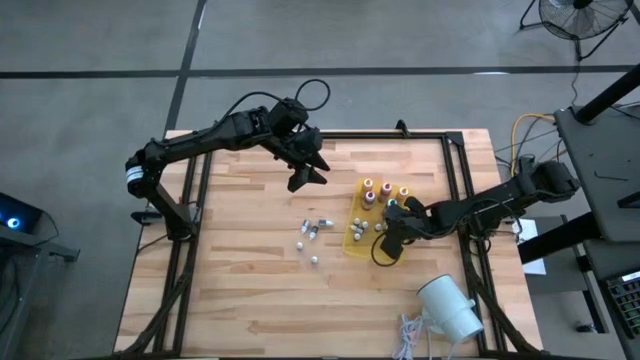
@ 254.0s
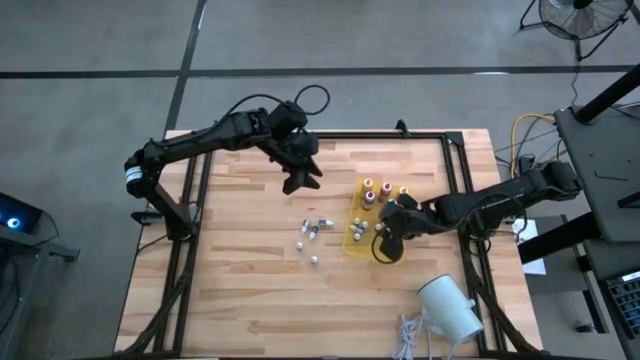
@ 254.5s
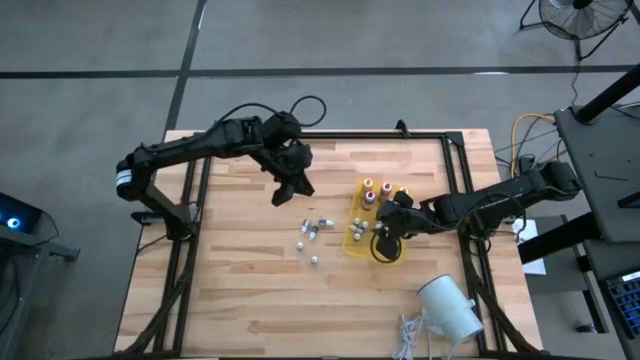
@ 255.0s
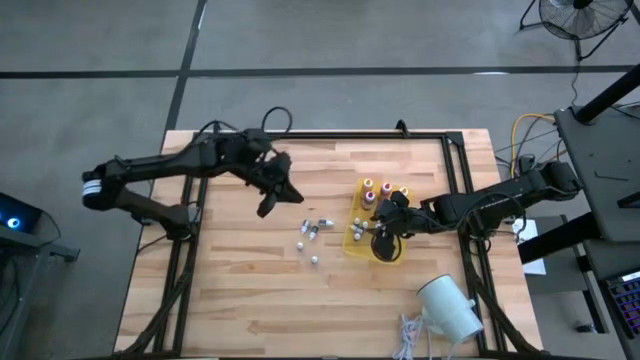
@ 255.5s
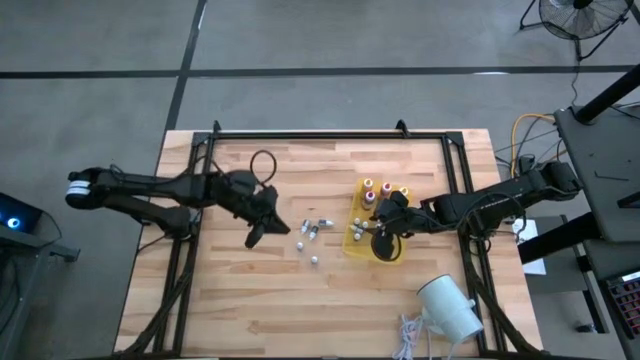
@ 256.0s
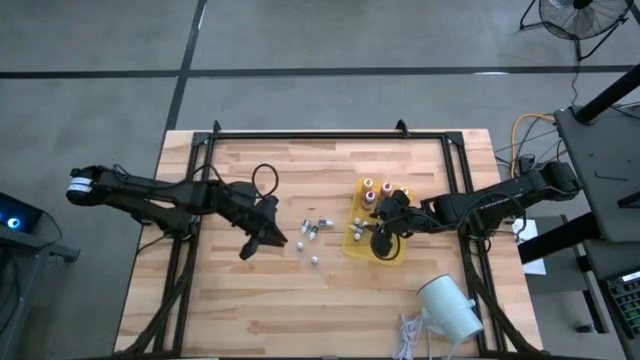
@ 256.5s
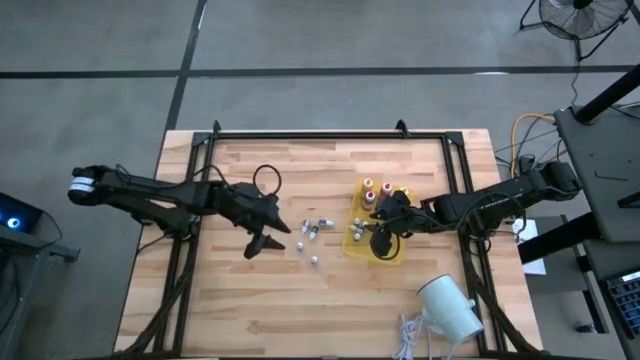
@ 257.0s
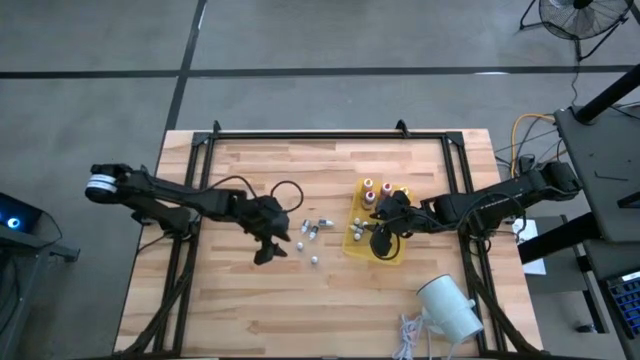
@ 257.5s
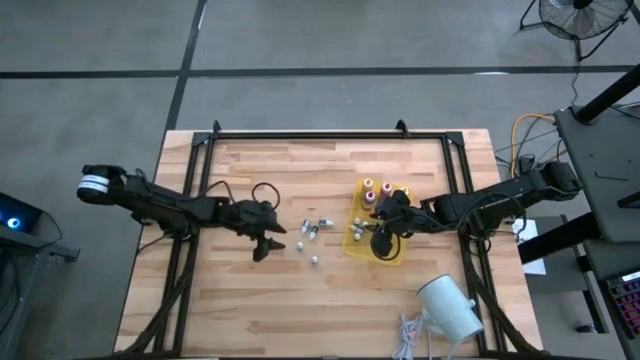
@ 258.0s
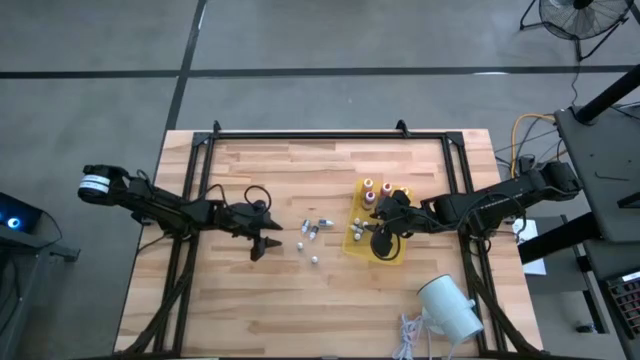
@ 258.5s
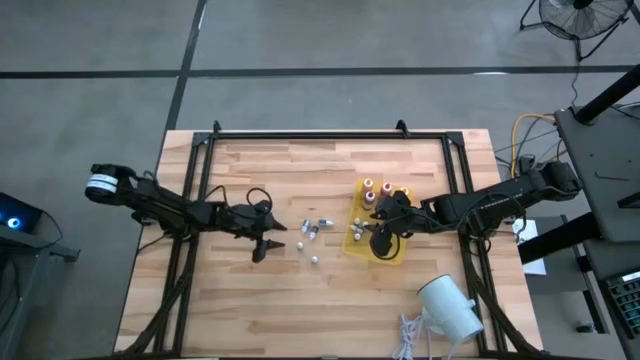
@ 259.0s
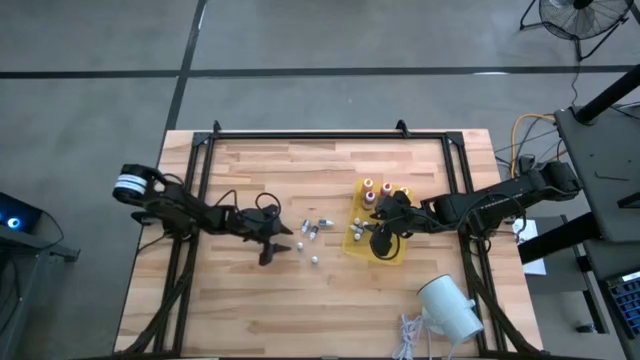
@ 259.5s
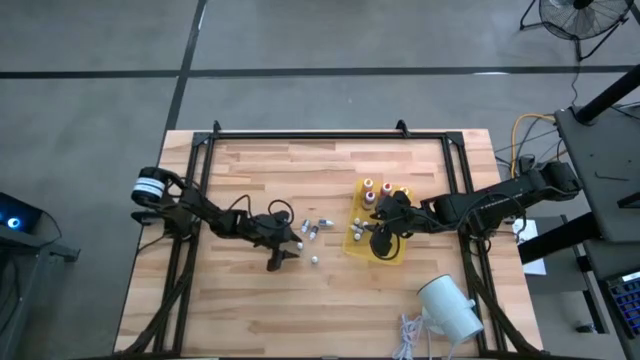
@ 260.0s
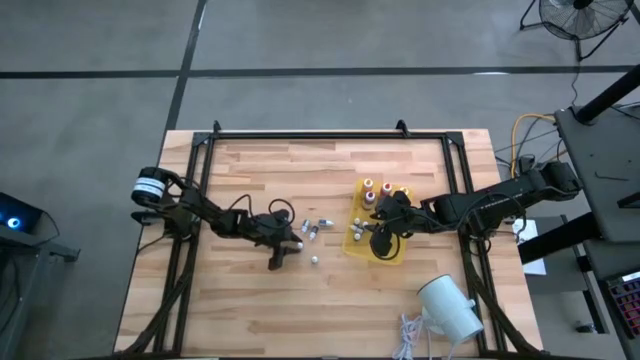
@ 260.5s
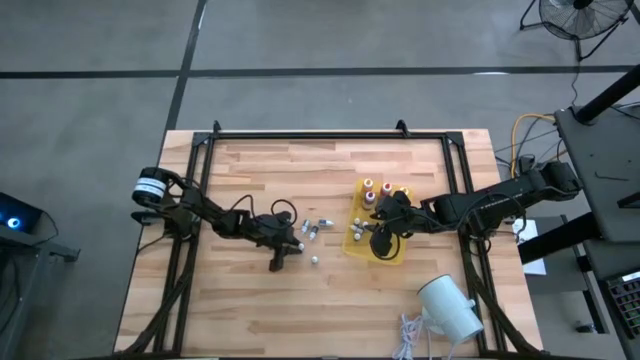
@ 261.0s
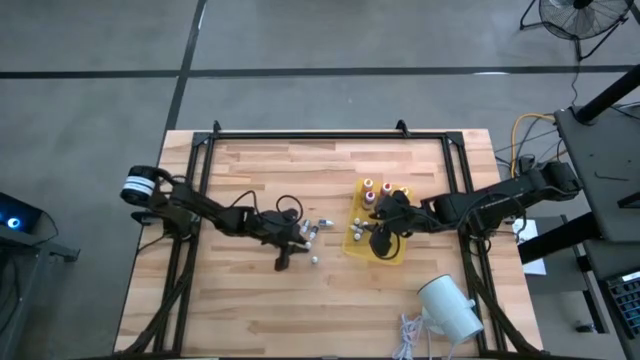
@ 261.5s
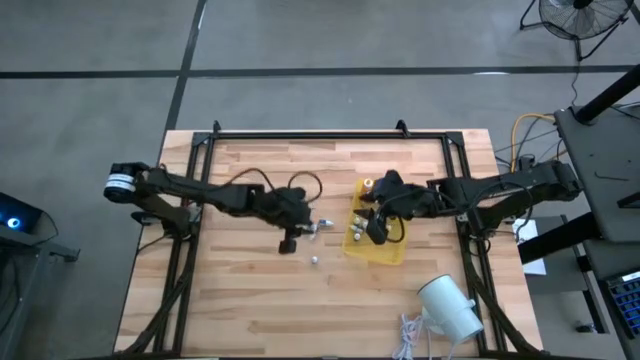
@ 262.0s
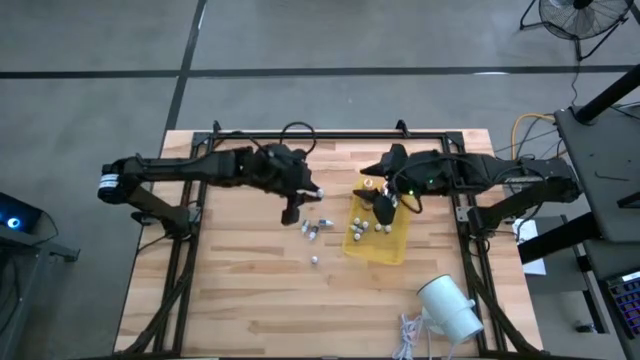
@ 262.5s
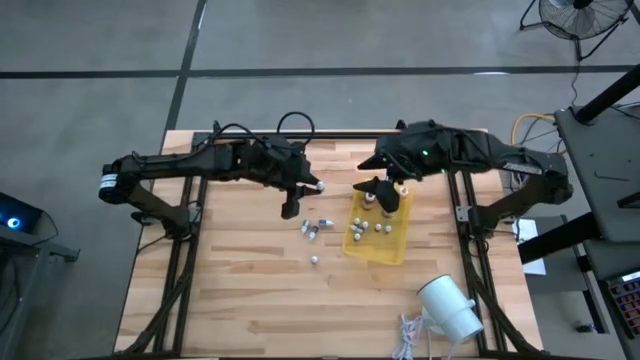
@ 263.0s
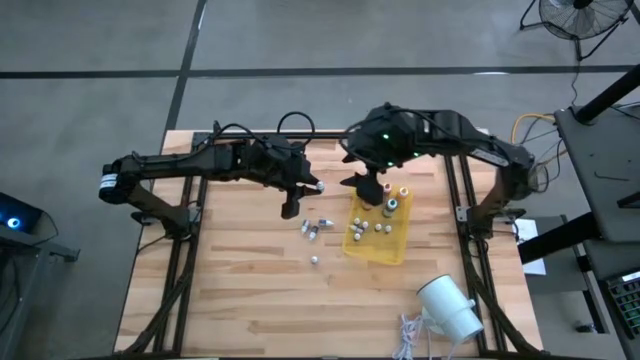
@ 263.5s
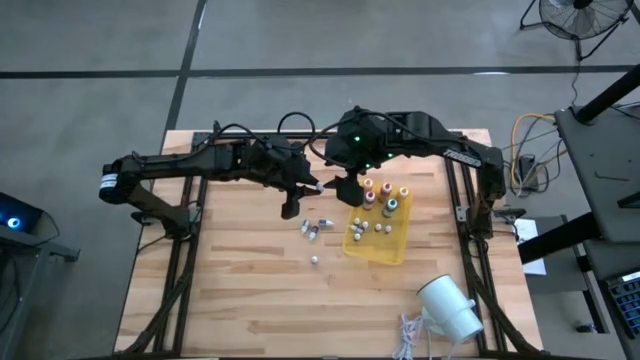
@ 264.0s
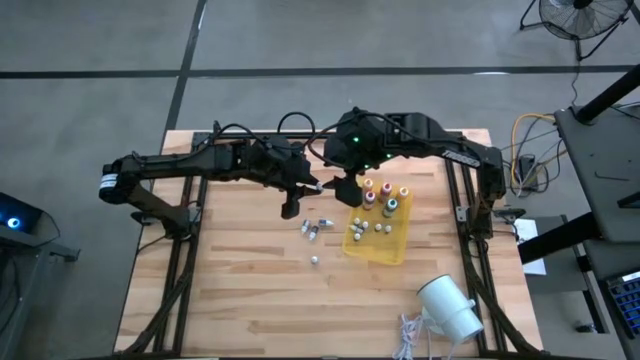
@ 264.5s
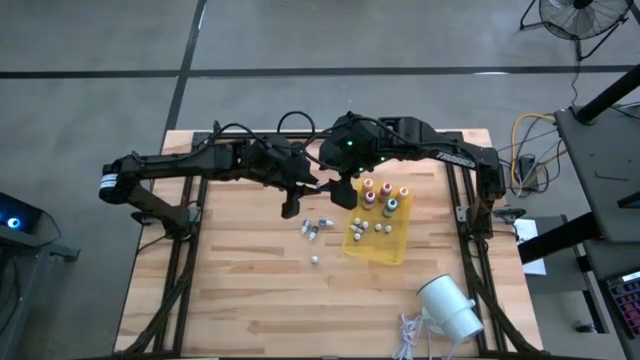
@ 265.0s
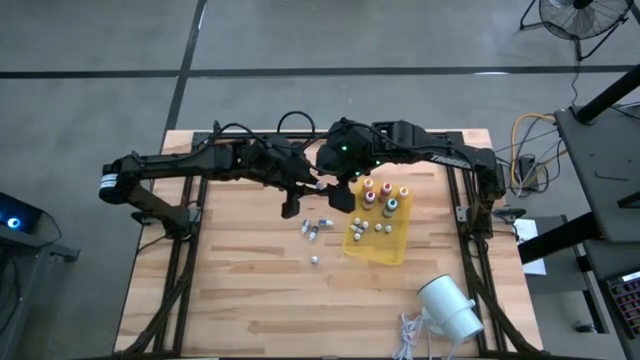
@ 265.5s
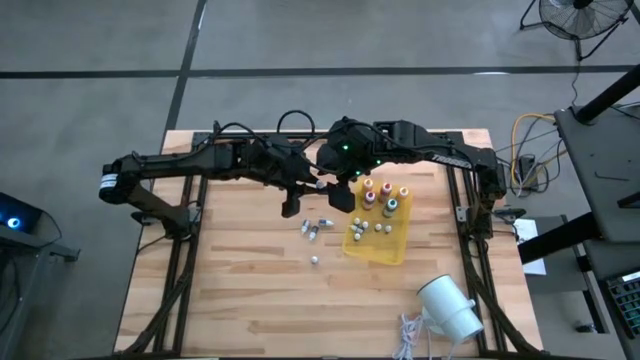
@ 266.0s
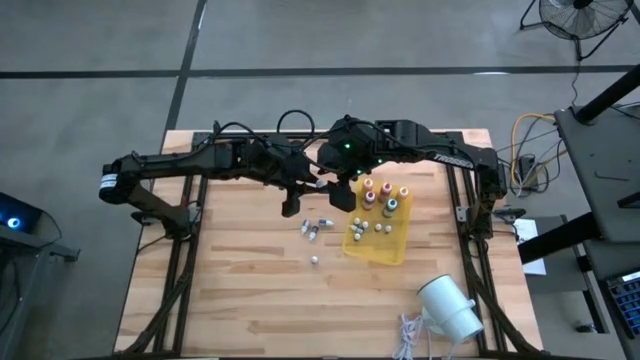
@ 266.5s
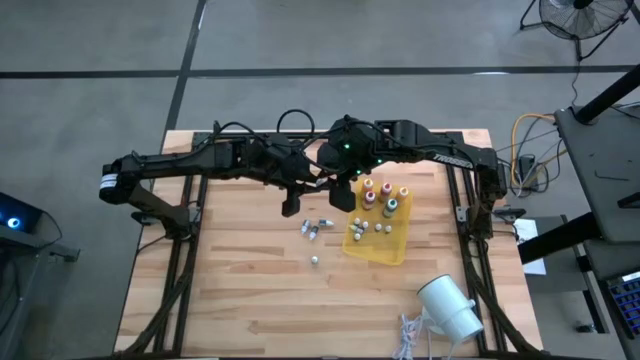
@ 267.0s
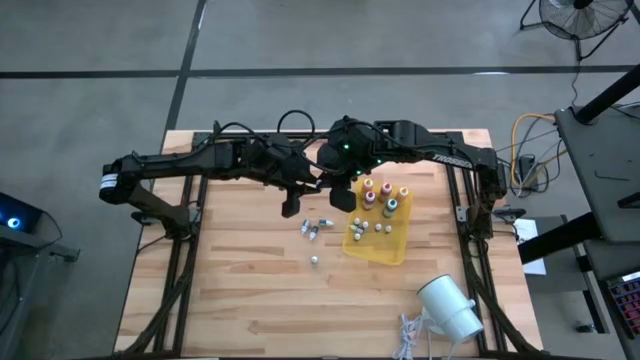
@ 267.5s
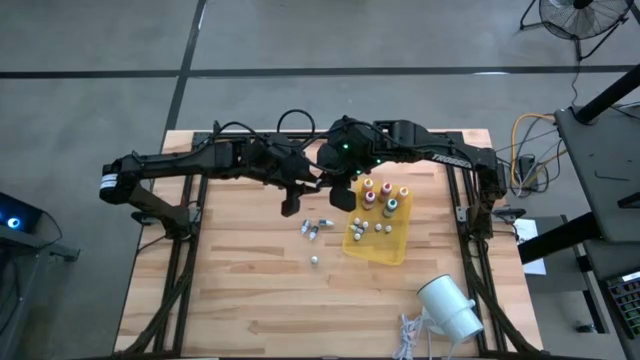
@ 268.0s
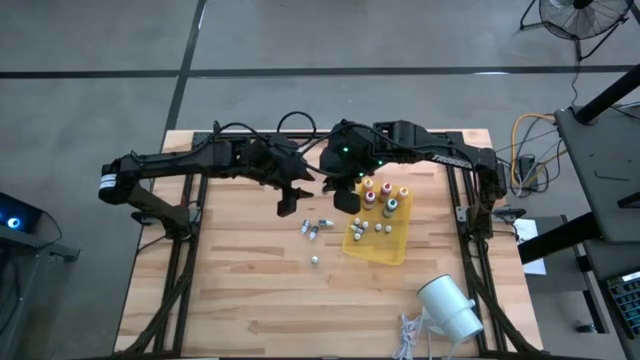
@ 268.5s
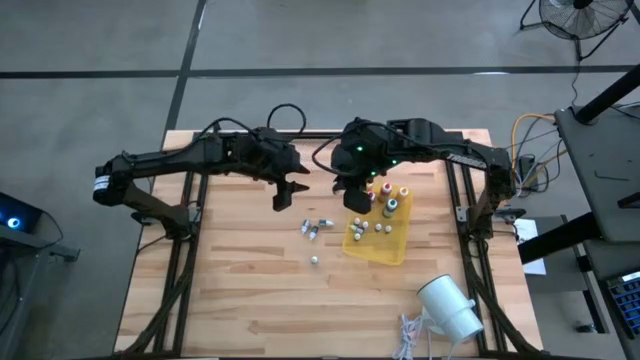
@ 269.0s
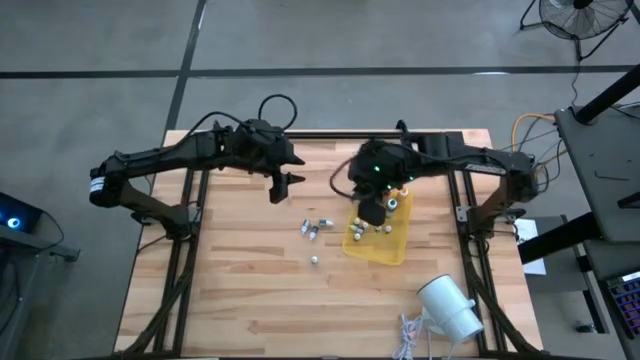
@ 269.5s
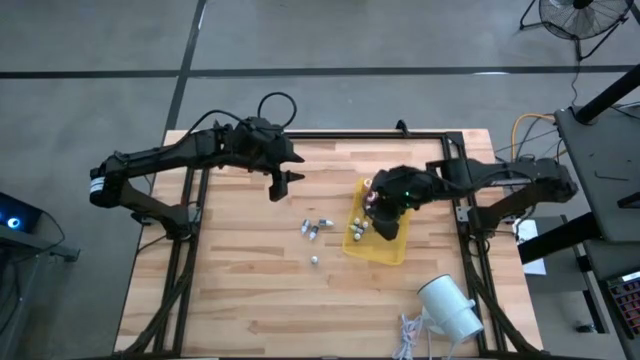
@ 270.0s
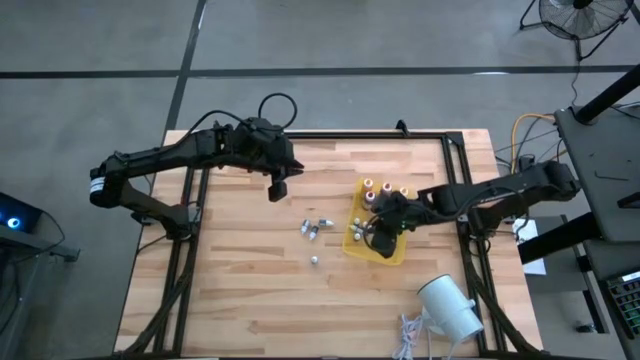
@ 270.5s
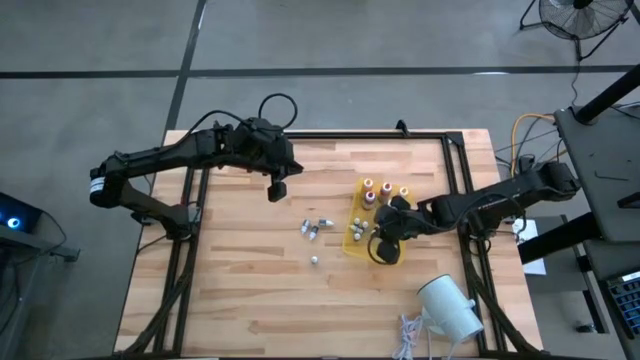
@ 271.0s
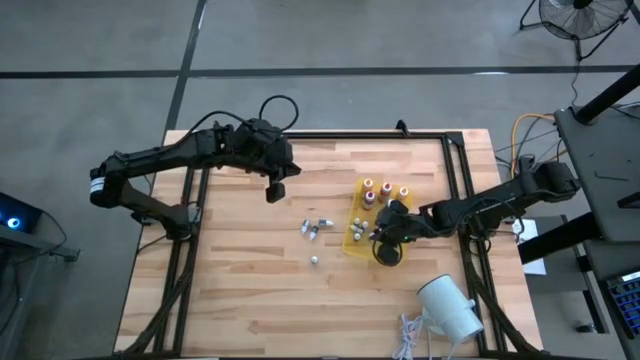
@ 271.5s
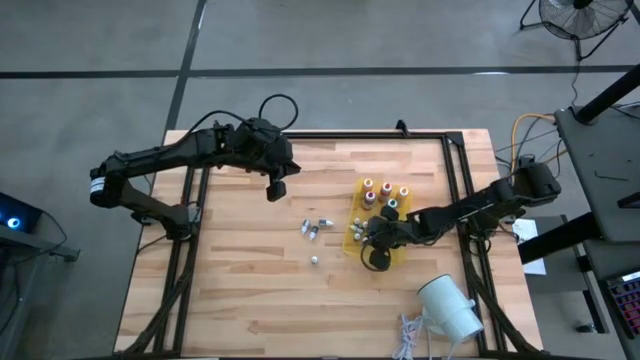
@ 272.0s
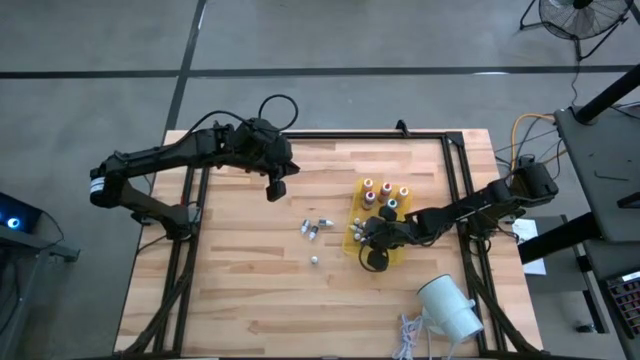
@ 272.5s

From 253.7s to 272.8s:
Task: Pick & Place food coloring
Put the small black food coloring bottle into the yellow bin
